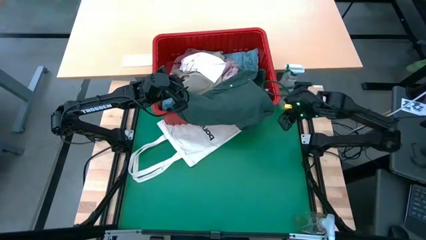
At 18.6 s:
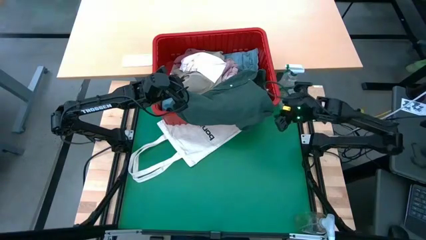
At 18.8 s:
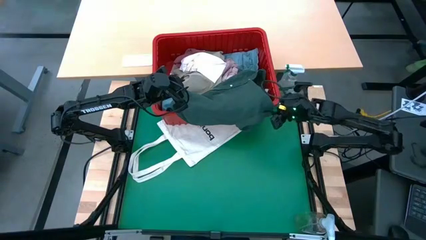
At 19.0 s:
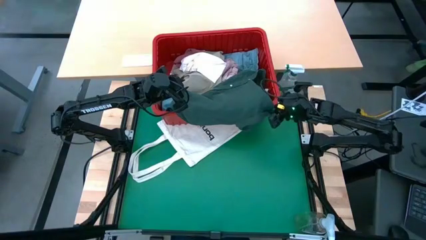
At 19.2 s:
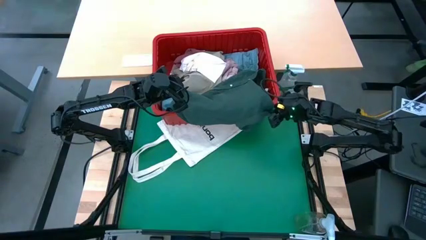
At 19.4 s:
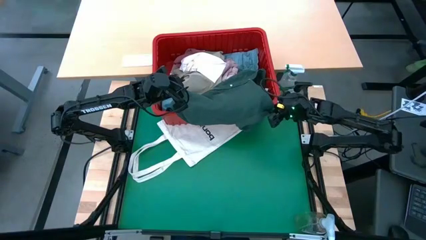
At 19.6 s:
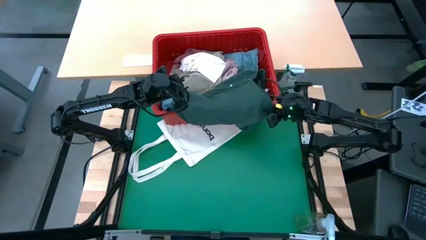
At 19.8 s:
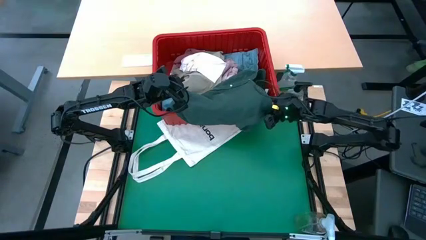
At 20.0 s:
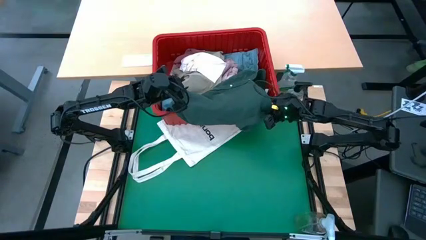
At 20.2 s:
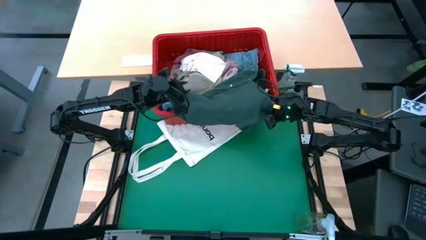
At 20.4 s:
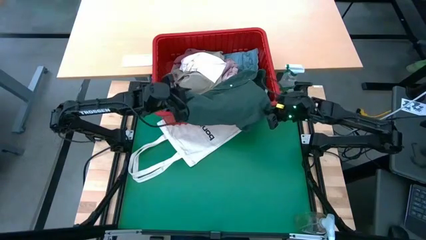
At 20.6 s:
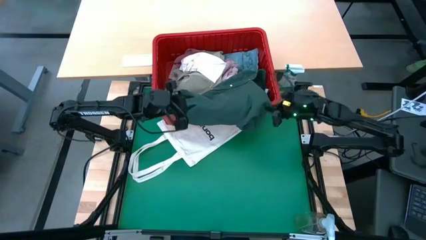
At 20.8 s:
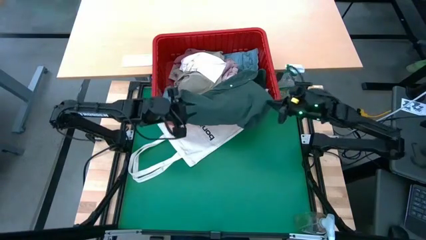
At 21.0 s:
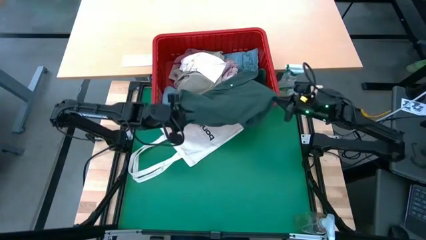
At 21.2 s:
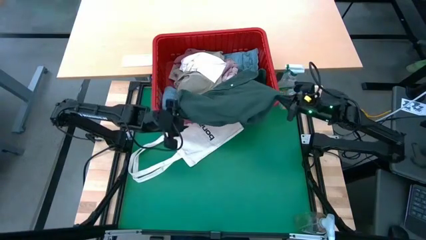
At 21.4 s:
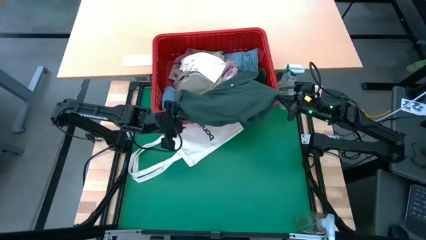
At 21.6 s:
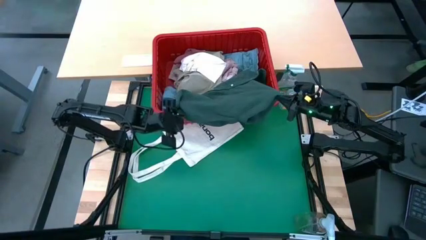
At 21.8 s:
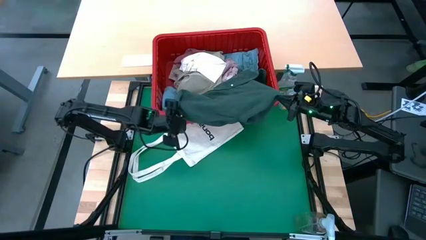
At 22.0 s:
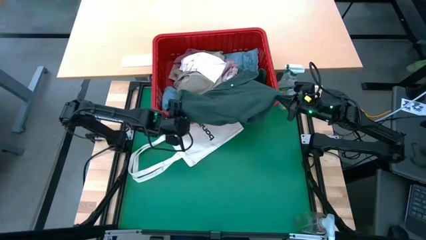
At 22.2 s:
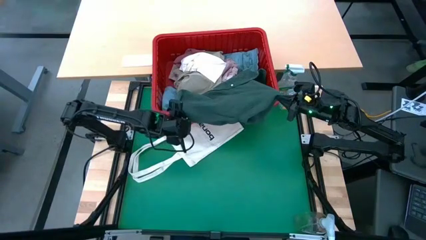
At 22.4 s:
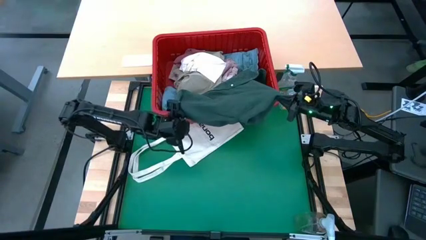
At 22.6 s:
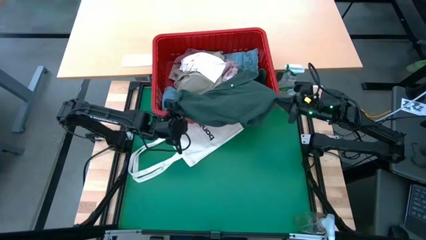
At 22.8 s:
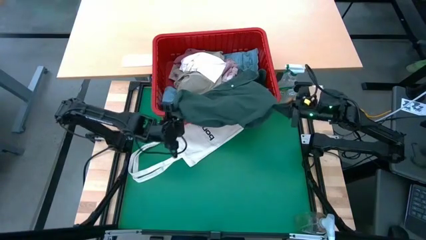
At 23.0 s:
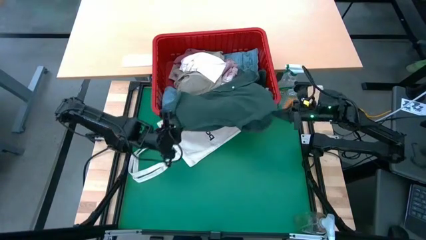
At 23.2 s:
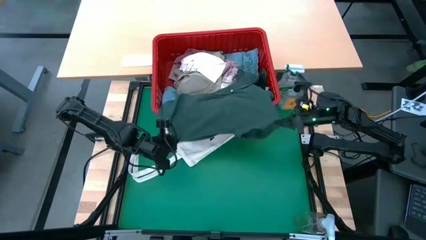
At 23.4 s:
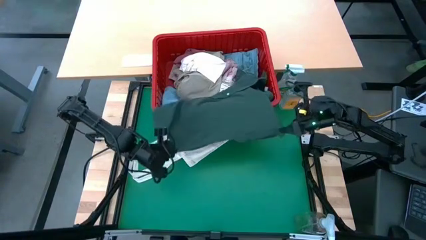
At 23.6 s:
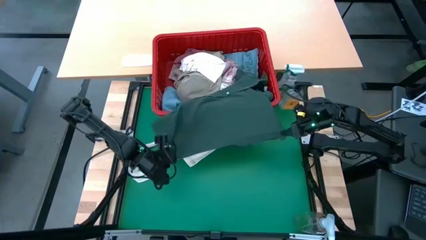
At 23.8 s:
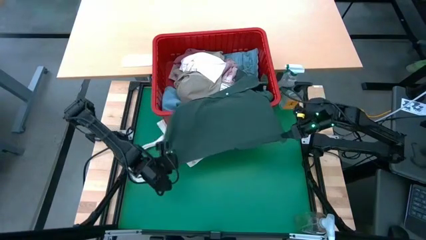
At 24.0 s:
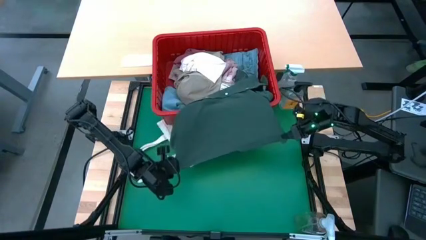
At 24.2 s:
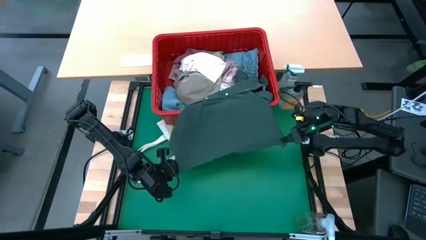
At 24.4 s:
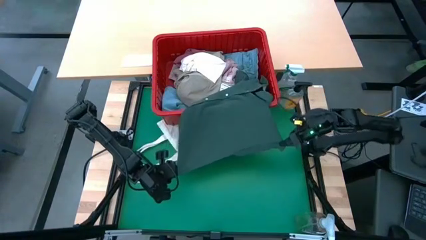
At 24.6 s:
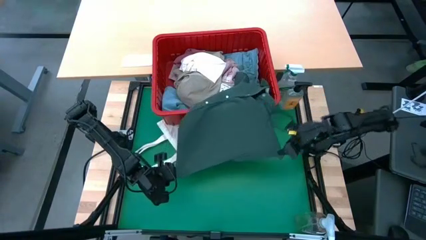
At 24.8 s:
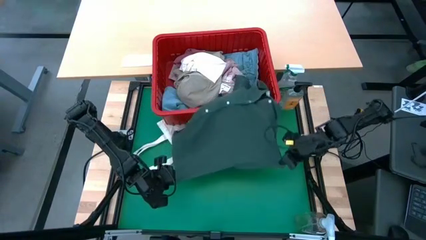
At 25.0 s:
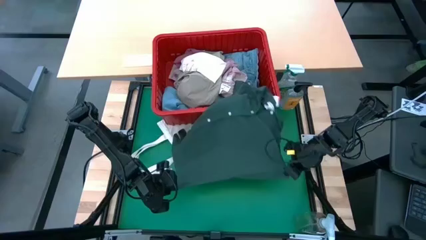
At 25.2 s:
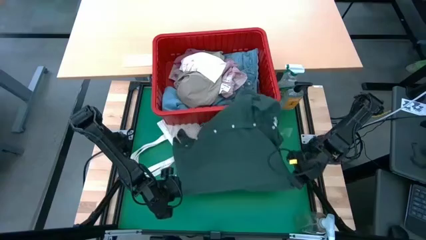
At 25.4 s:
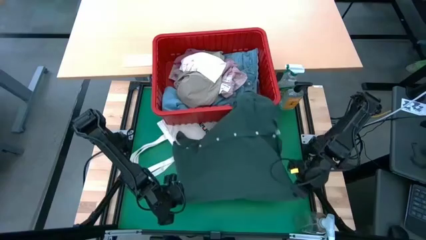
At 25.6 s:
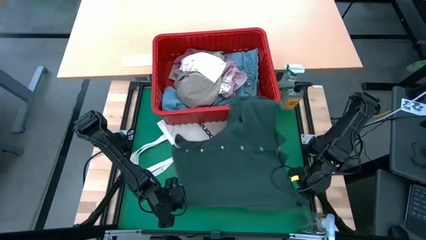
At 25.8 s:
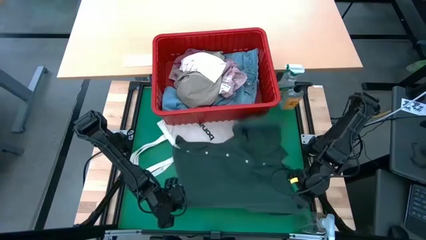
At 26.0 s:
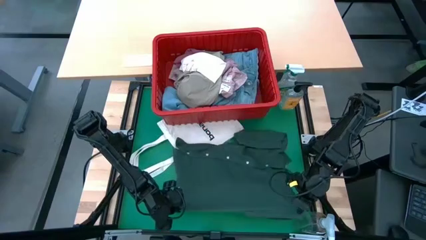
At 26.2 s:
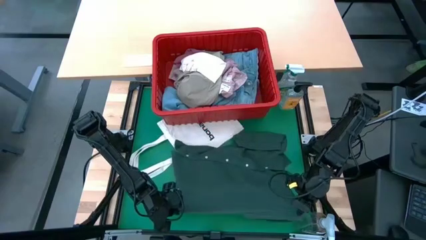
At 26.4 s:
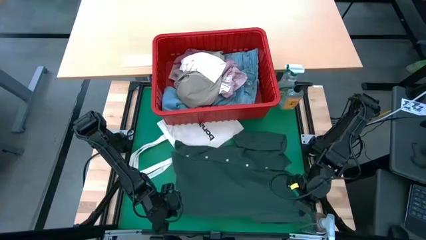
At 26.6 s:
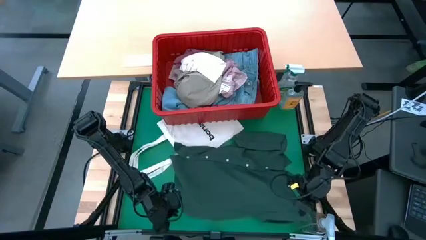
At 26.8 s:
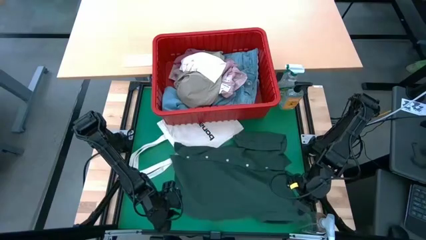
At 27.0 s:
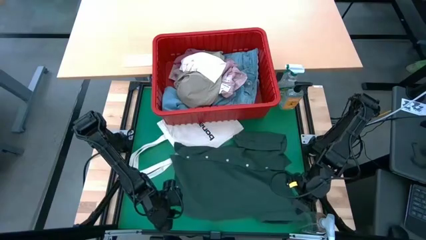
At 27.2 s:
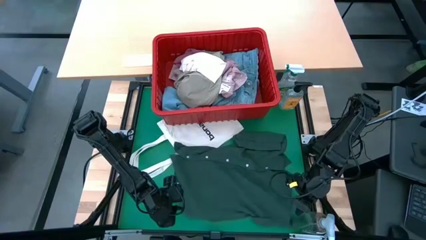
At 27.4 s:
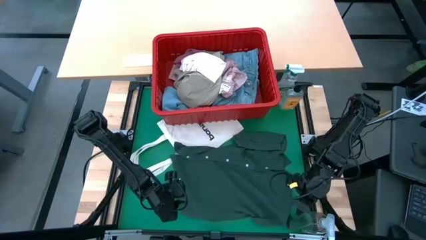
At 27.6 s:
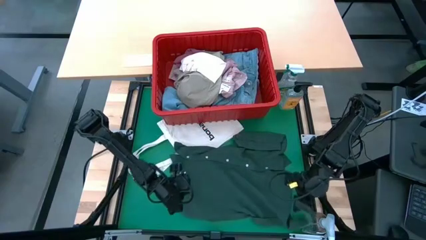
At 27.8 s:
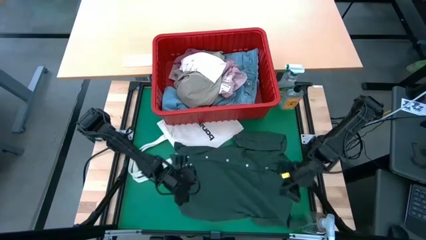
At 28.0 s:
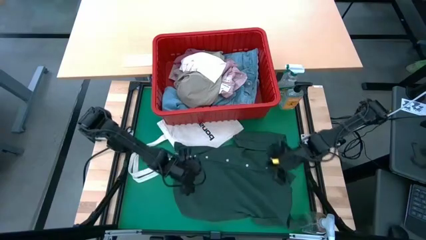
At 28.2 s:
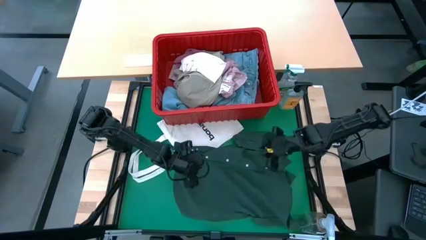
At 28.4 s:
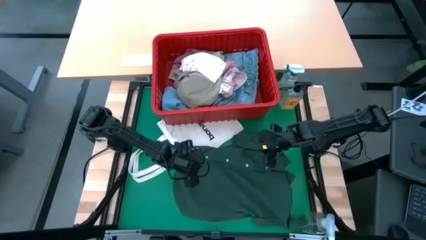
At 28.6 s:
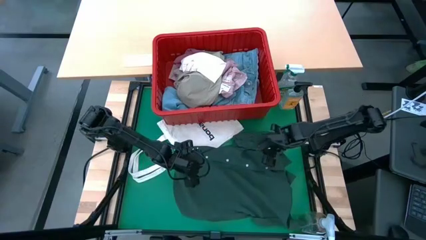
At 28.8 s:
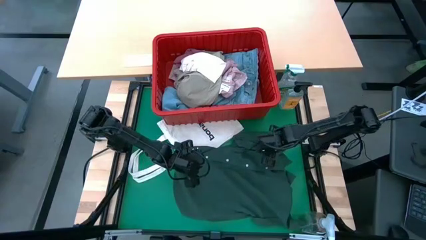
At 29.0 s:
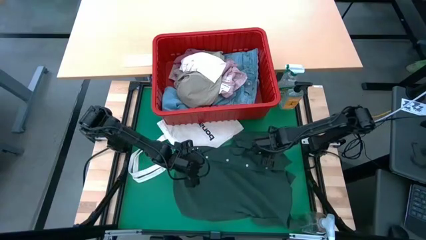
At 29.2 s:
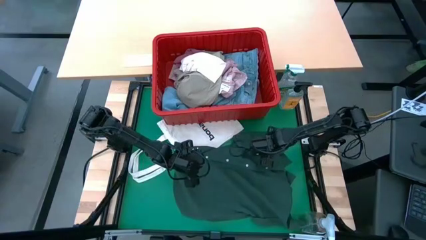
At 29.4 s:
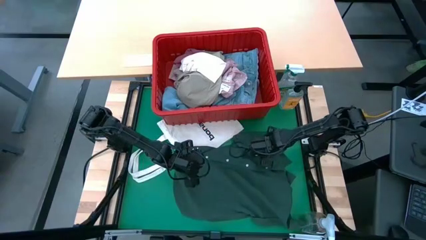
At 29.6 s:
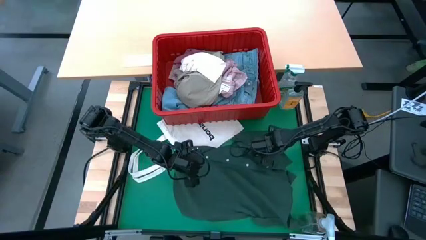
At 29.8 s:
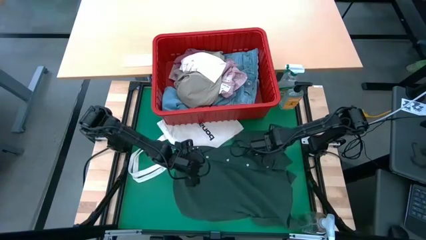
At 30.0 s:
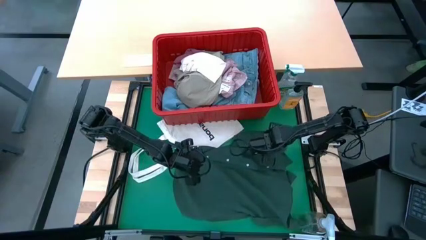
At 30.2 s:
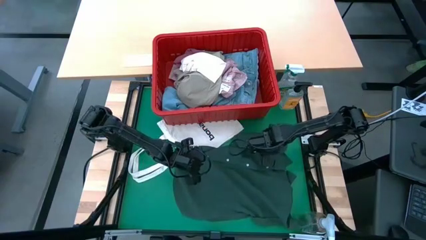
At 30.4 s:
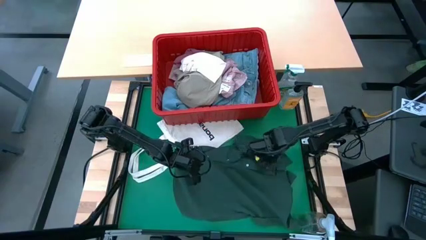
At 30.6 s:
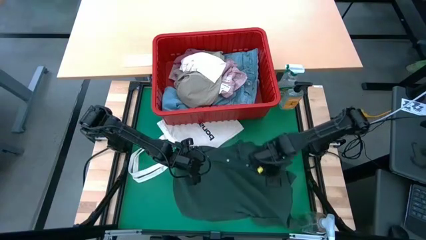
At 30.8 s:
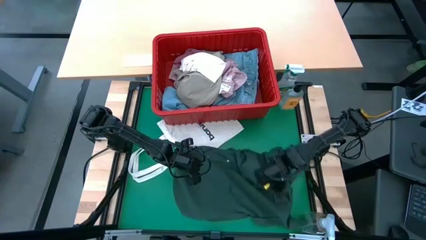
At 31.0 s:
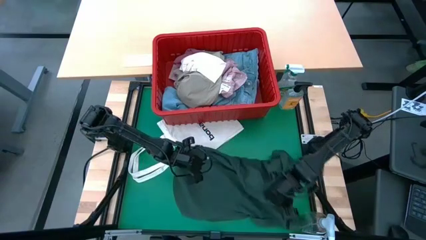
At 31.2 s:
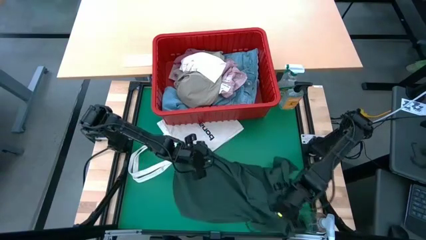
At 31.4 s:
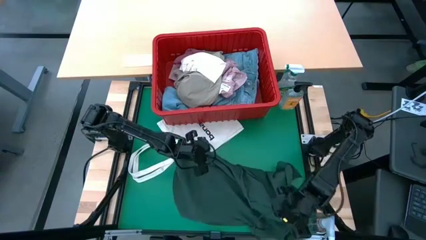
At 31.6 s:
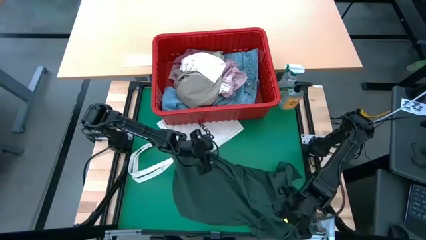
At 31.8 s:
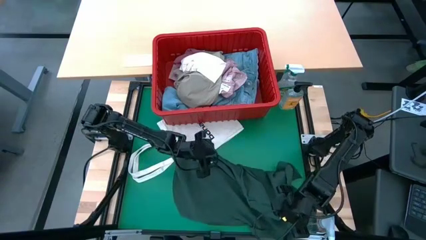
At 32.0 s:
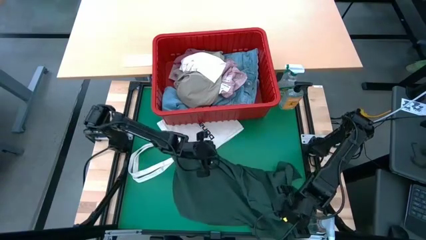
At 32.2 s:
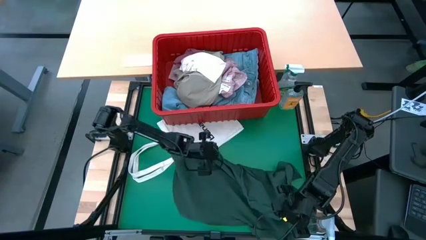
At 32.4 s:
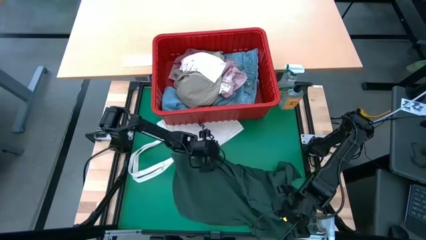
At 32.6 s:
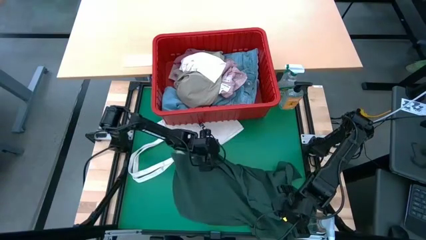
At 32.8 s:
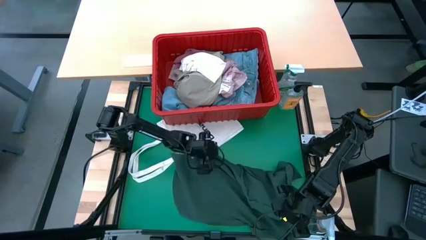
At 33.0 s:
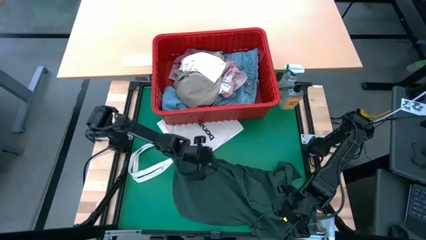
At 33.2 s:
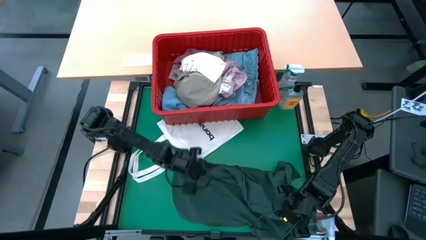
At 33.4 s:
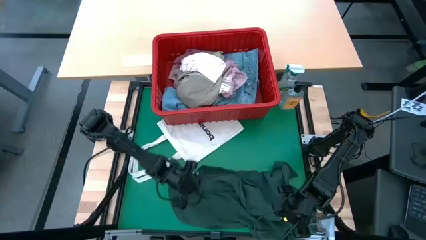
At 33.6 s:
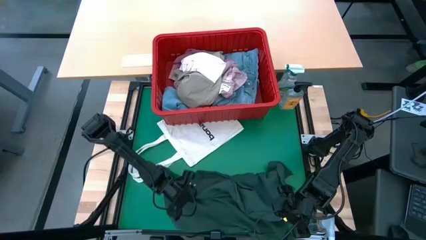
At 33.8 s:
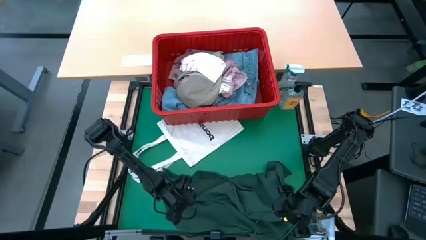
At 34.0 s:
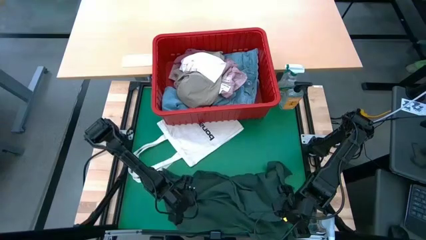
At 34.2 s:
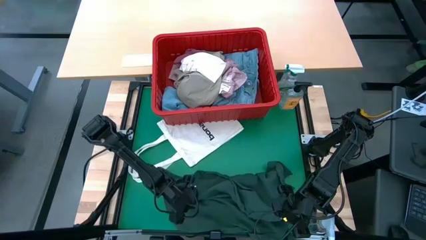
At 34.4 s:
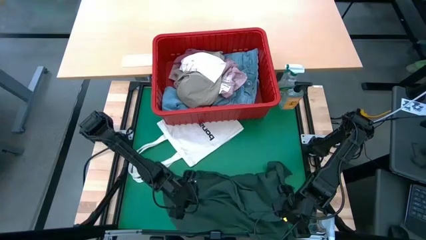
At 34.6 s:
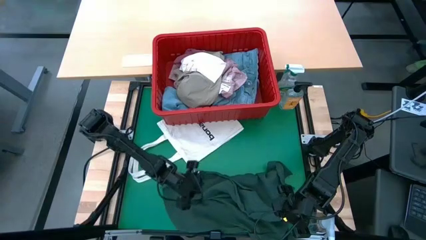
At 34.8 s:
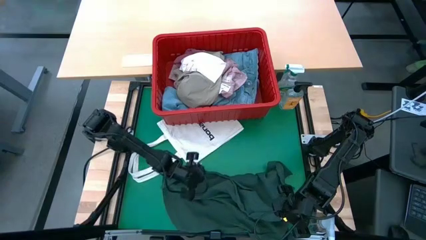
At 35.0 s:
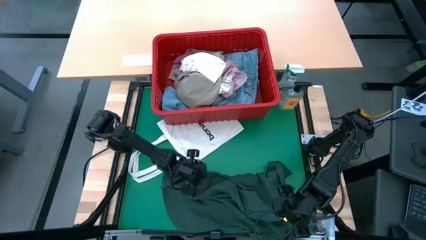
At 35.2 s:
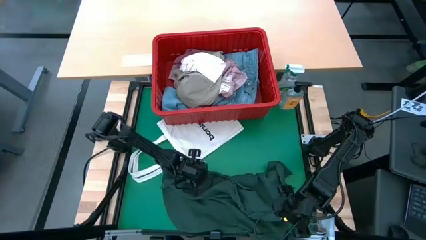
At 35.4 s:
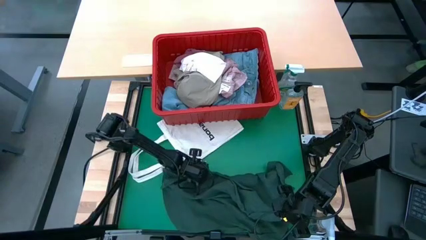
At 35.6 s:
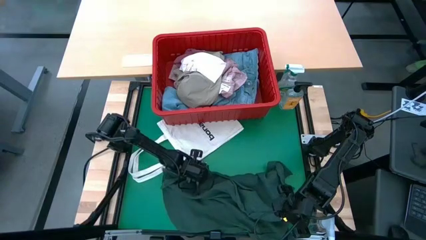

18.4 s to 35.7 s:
Task: Fold laundry
Fold the green shirt
